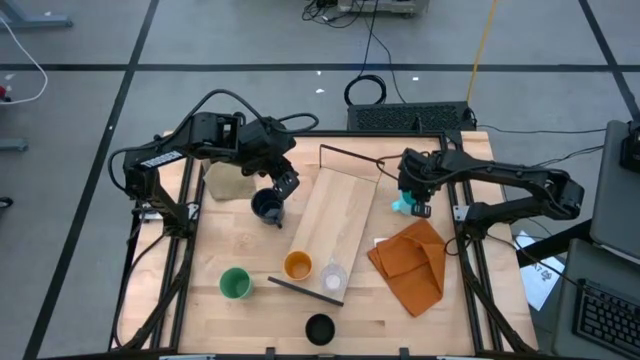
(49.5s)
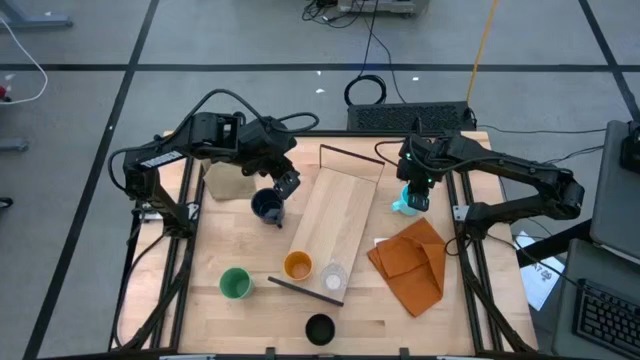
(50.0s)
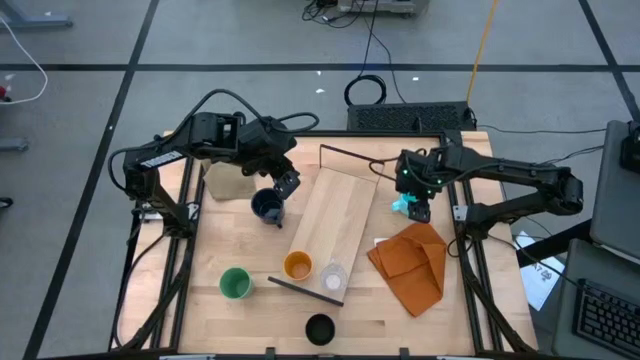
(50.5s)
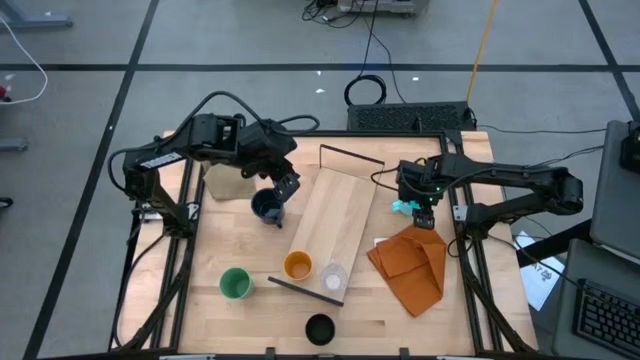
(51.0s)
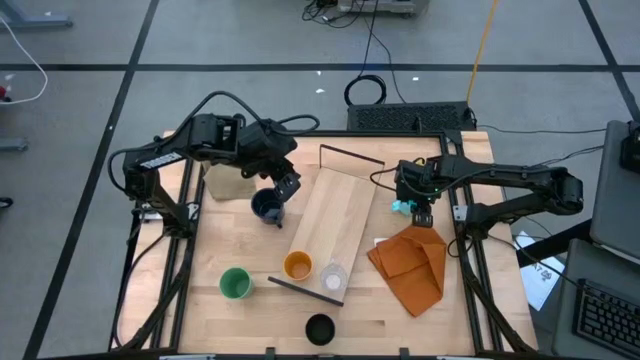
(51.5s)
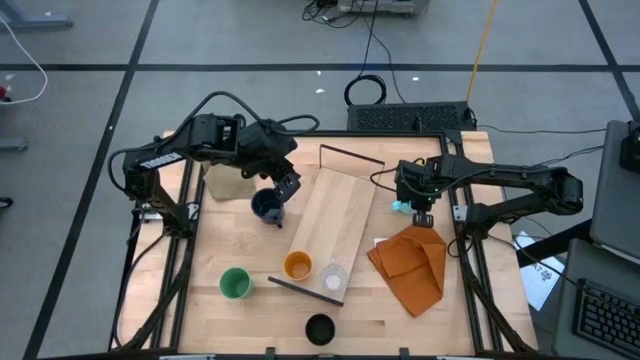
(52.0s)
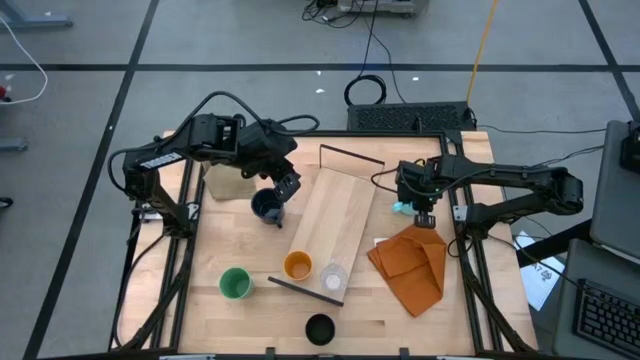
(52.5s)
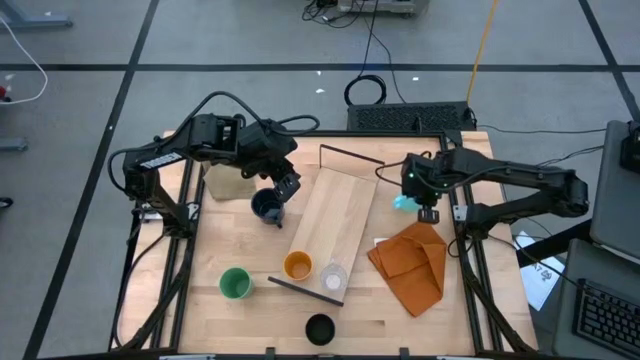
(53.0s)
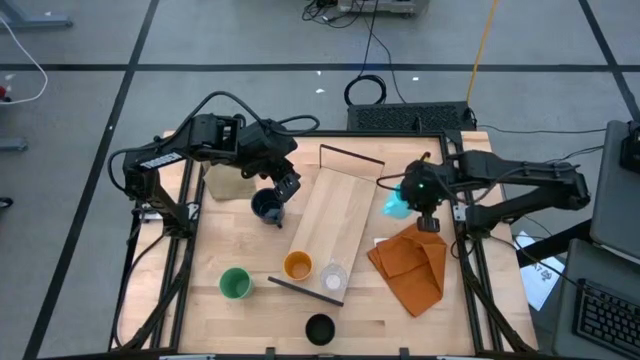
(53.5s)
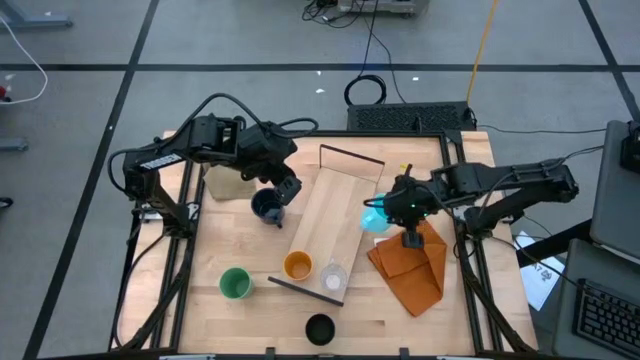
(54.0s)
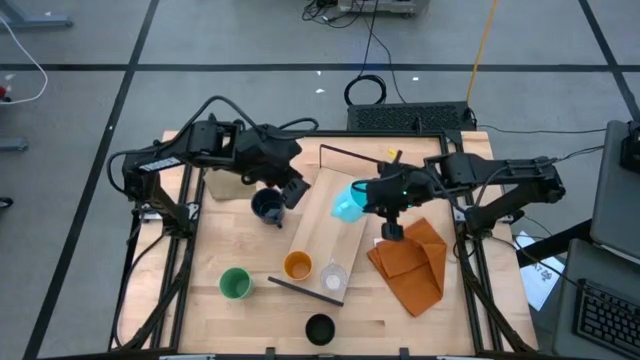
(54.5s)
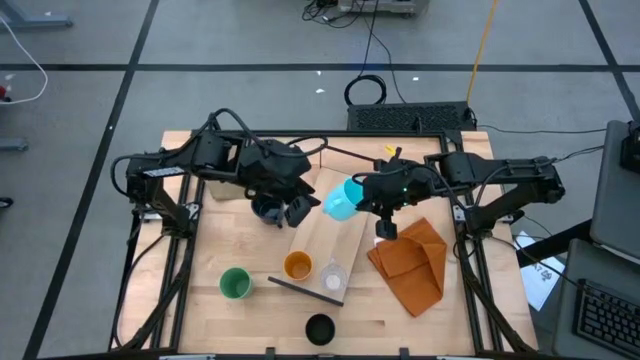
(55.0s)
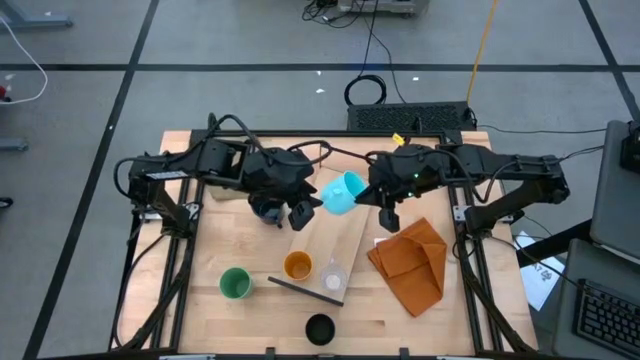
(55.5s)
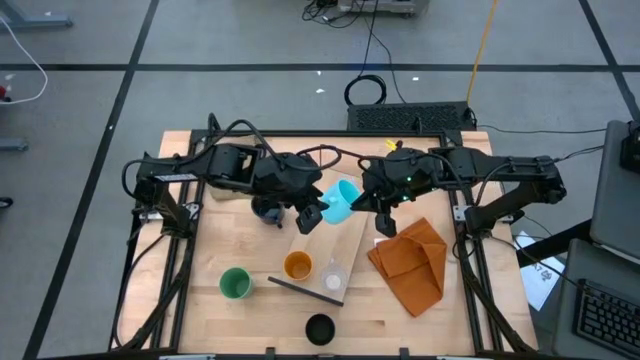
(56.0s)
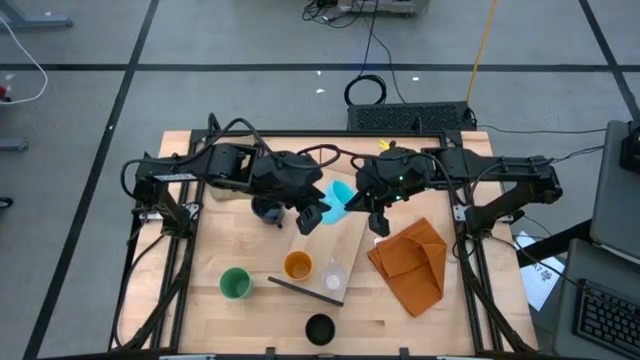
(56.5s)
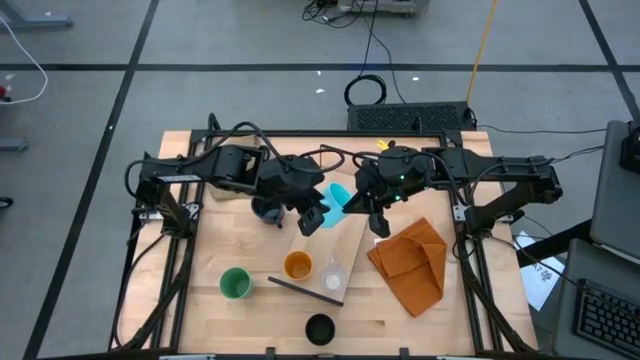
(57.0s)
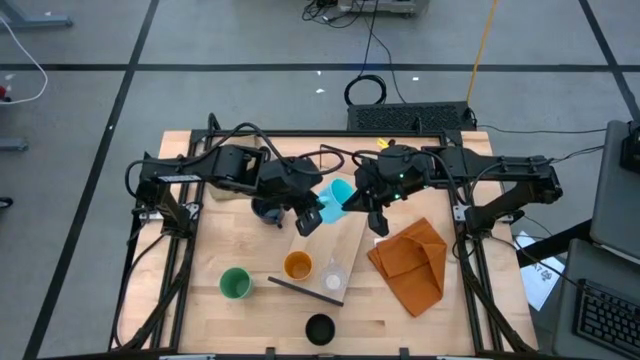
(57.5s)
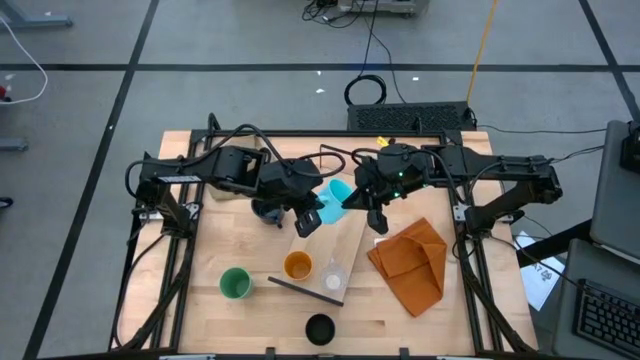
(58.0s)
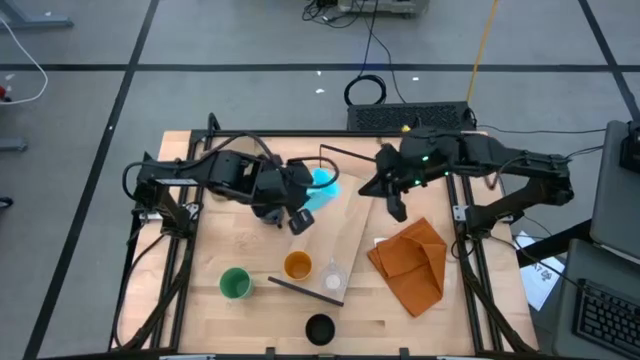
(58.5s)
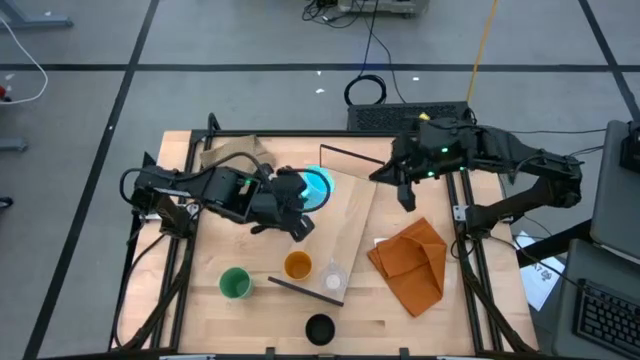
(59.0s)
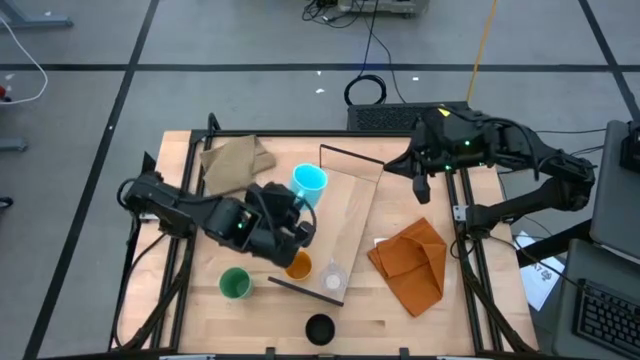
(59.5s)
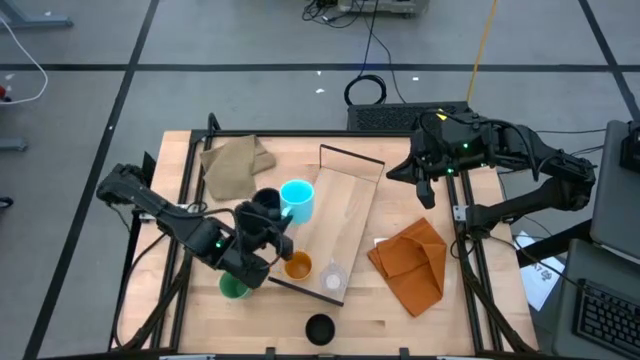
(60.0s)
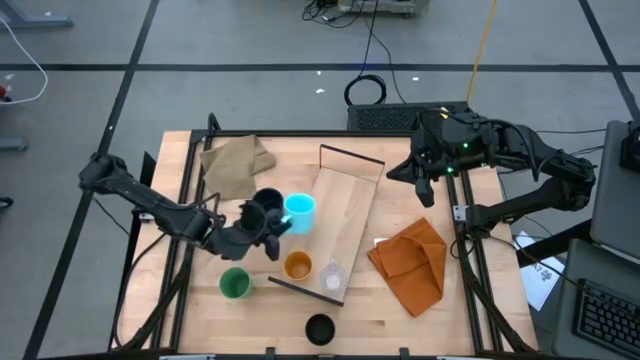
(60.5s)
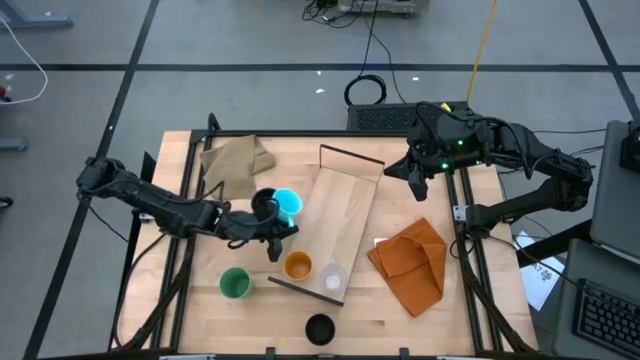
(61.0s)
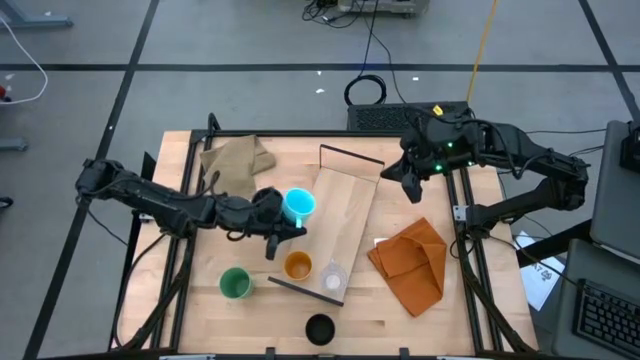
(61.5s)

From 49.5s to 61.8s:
Task: Stack small to large cups/mugs on shelf
Put the light blue mug on the shelf

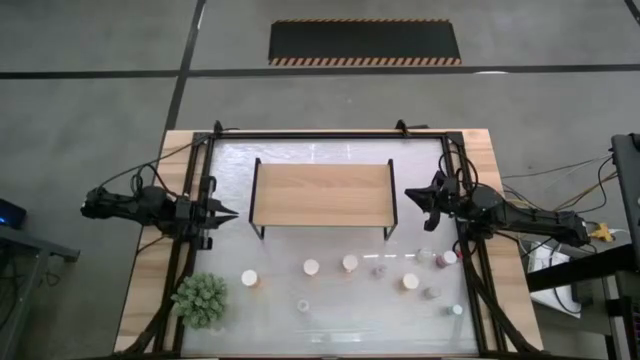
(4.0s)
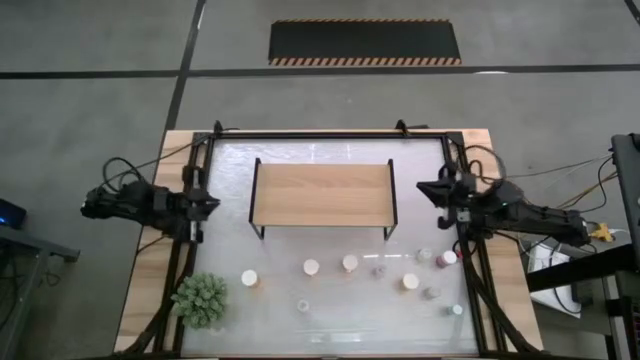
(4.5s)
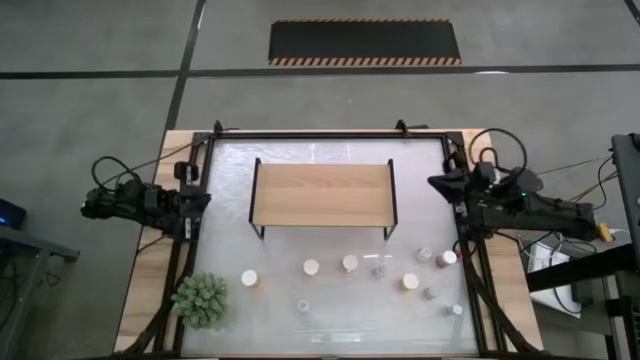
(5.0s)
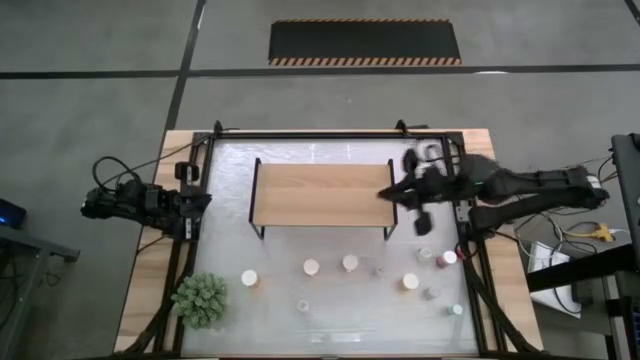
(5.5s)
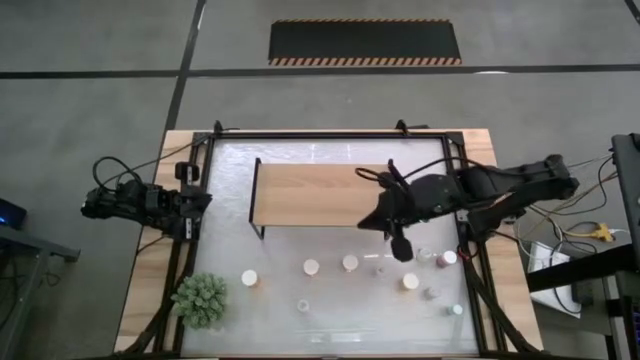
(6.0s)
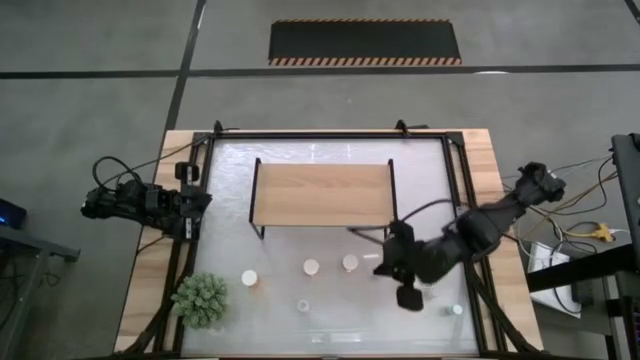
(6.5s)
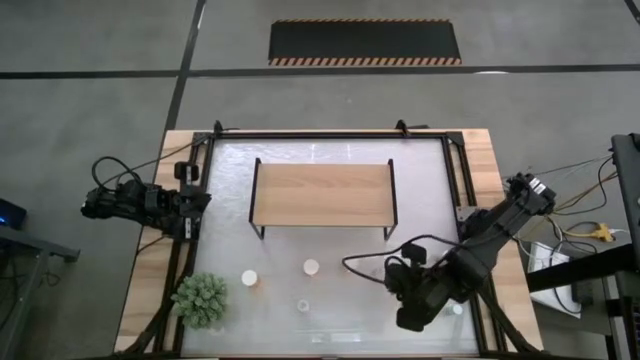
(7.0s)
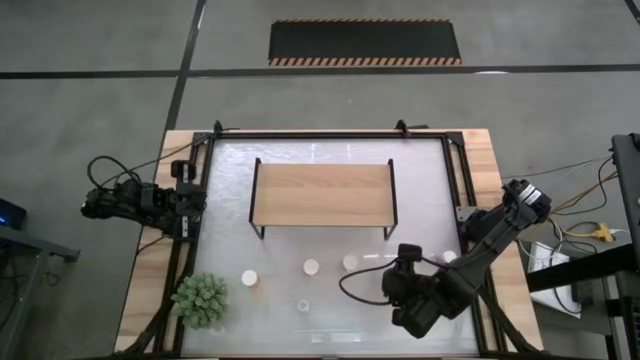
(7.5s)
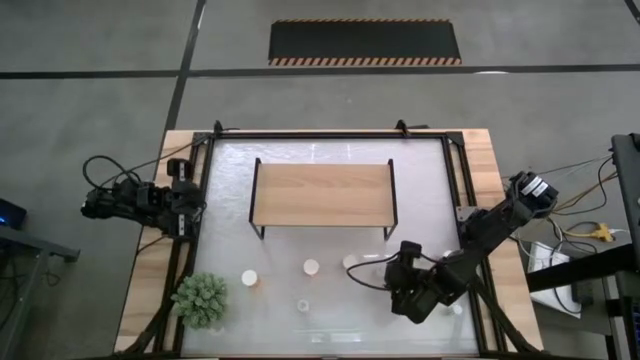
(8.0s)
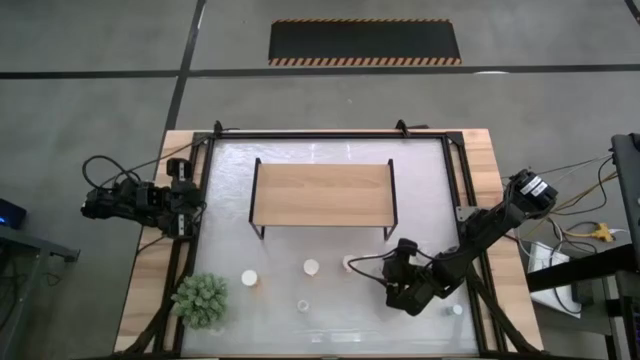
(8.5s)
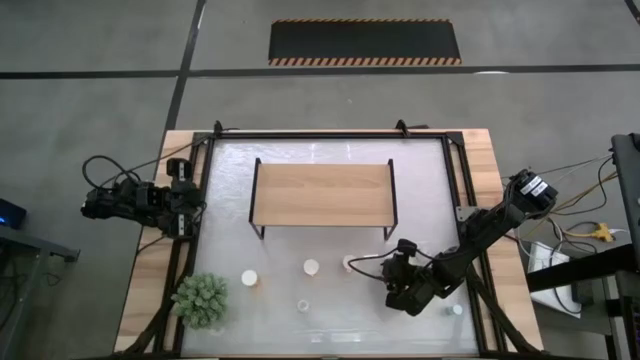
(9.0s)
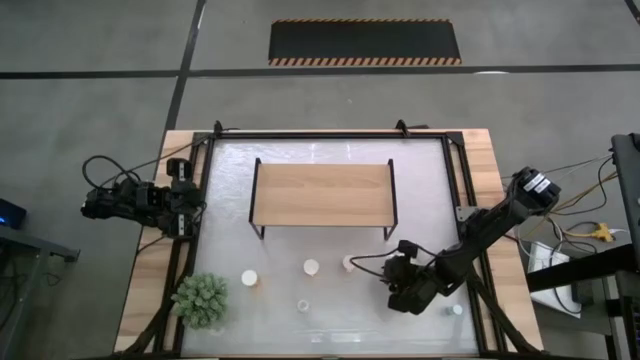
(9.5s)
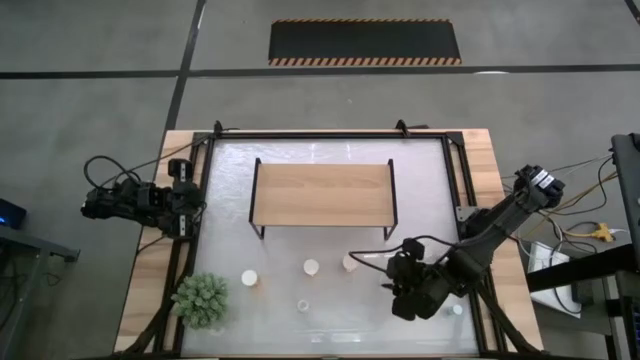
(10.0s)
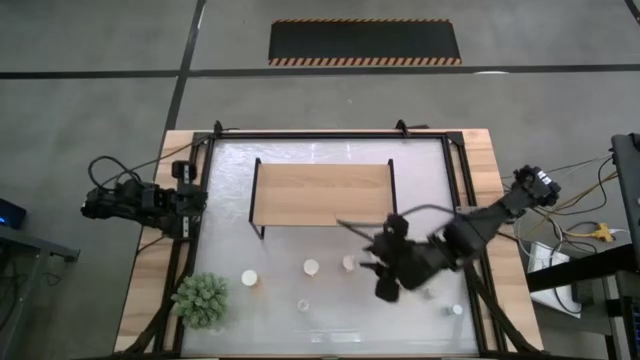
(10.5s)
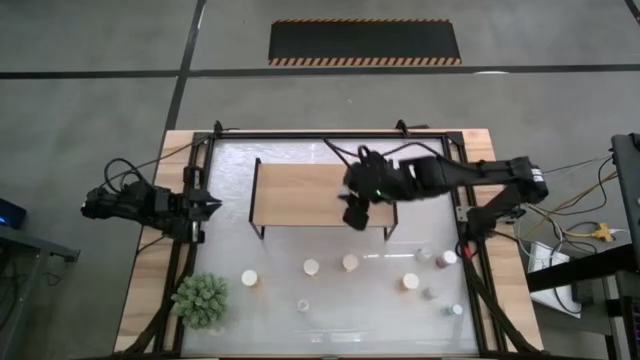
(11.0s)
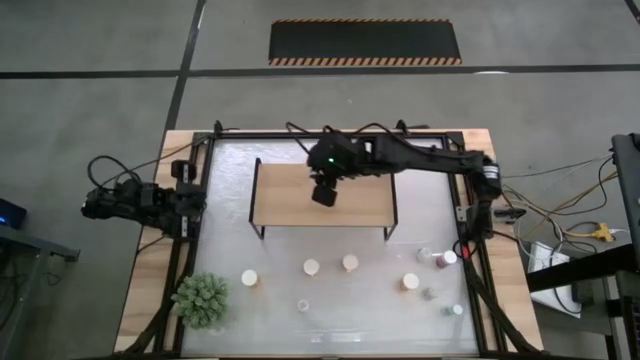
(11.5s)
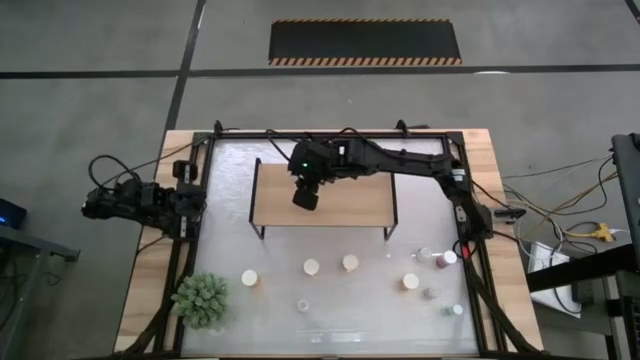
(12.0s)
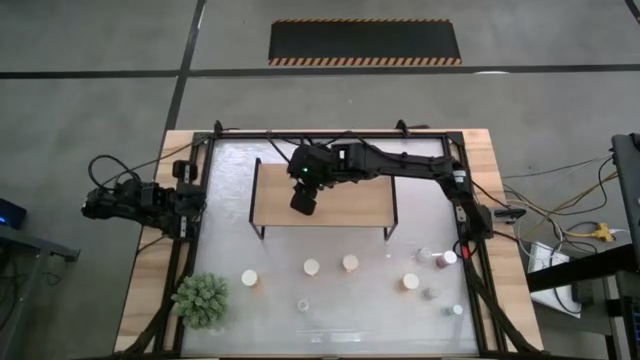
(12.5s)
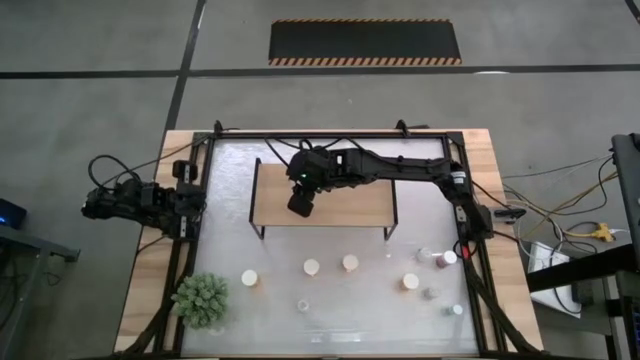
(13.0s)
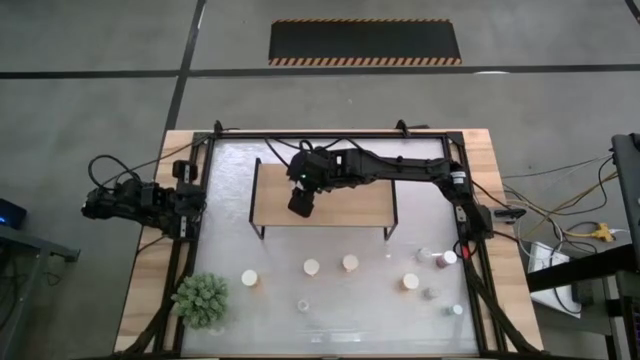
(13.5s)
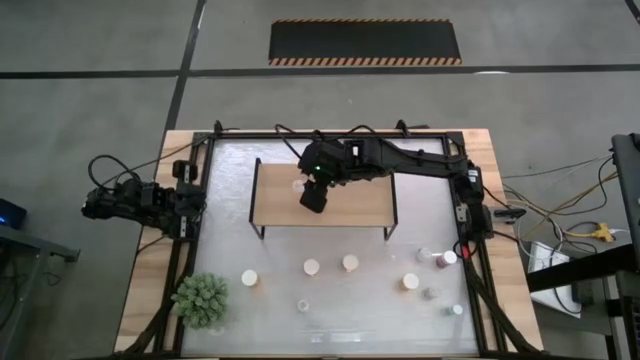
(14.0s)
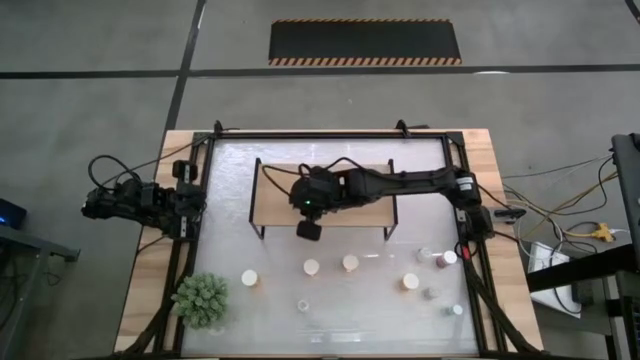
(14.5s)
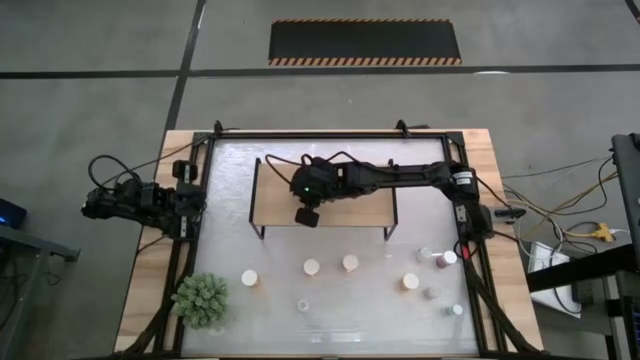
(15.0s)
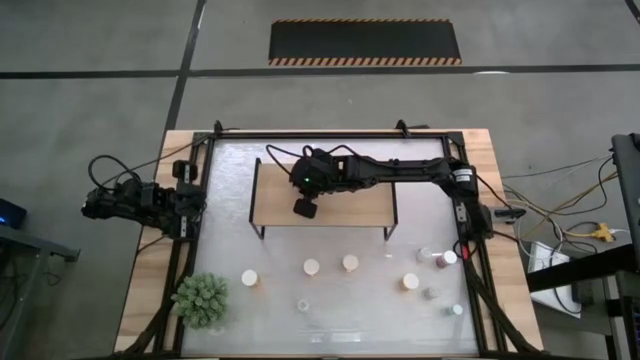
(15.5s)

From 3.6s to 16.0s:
Task: Pick and place medicine bottles onto shelf by color
Put the left transparent pill bottle on the shelf
